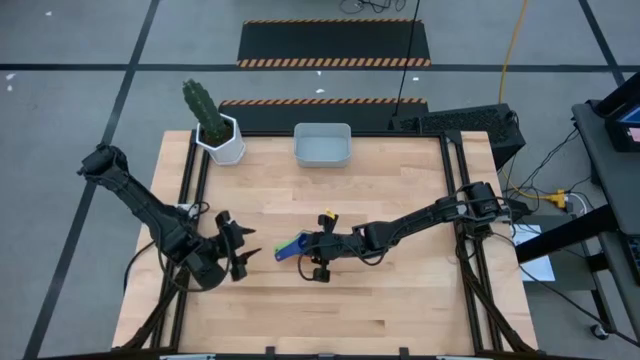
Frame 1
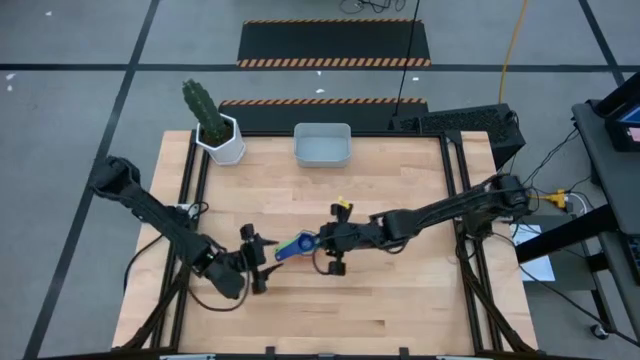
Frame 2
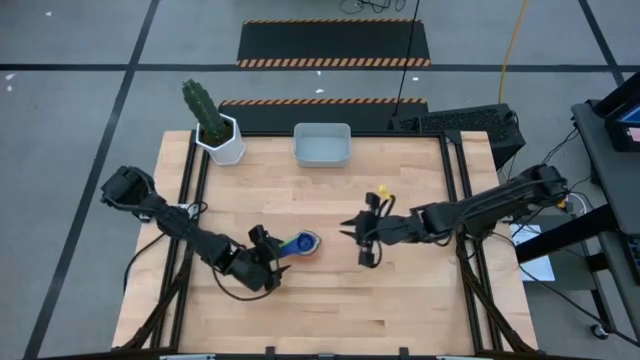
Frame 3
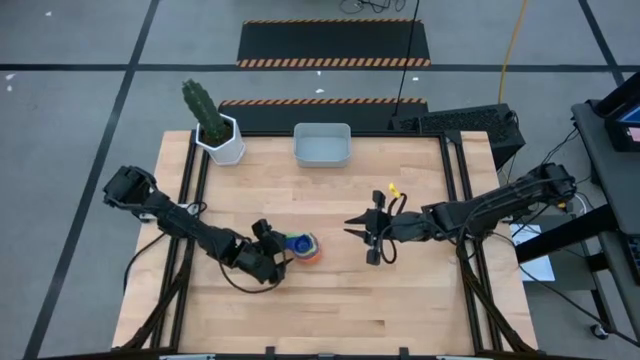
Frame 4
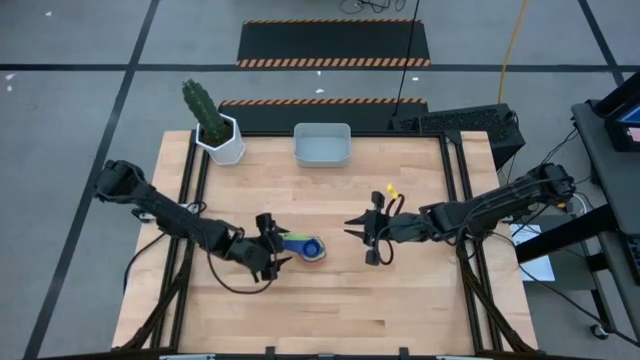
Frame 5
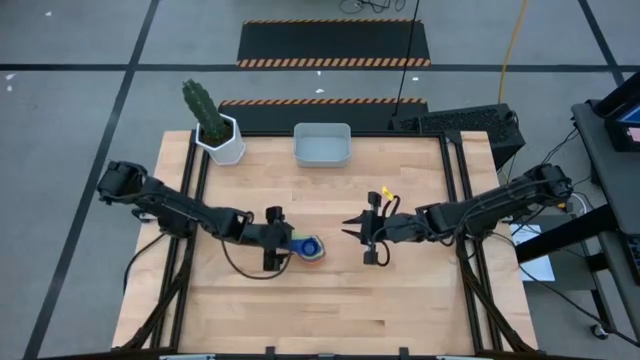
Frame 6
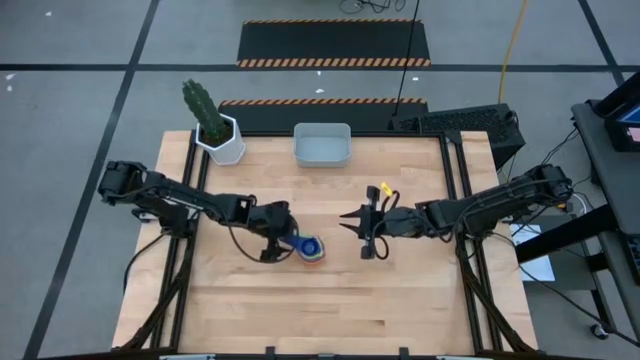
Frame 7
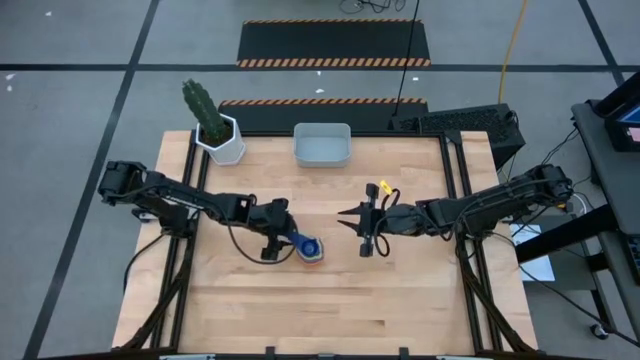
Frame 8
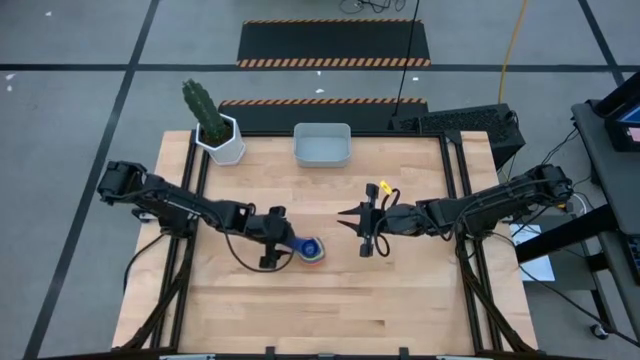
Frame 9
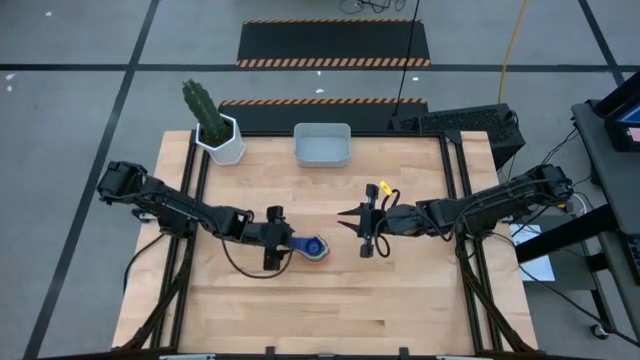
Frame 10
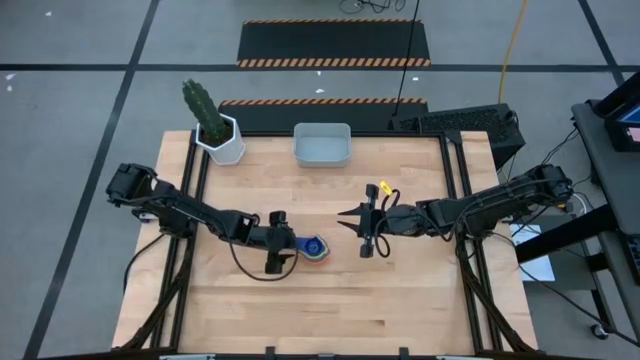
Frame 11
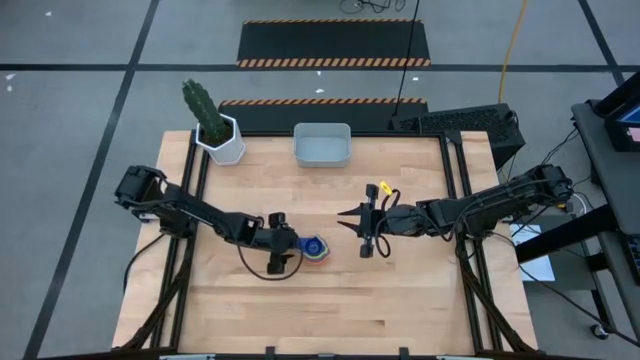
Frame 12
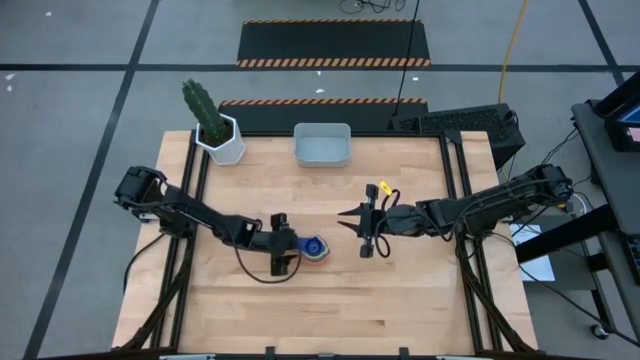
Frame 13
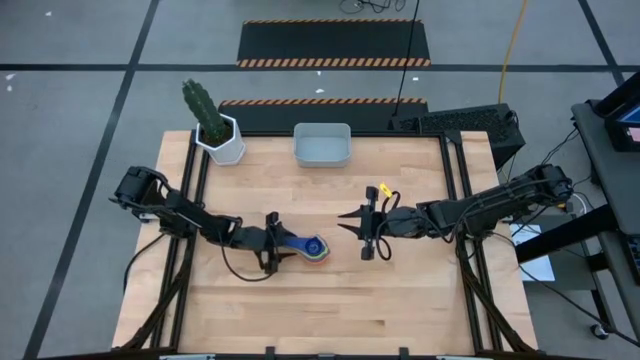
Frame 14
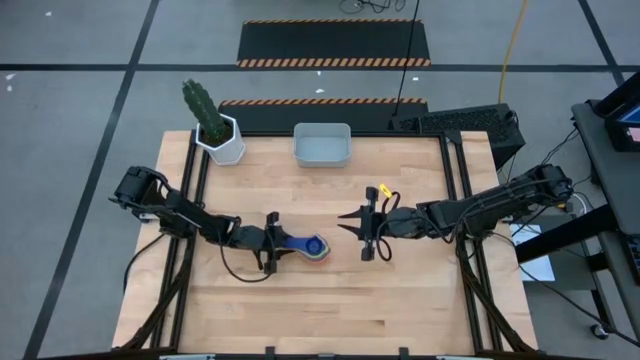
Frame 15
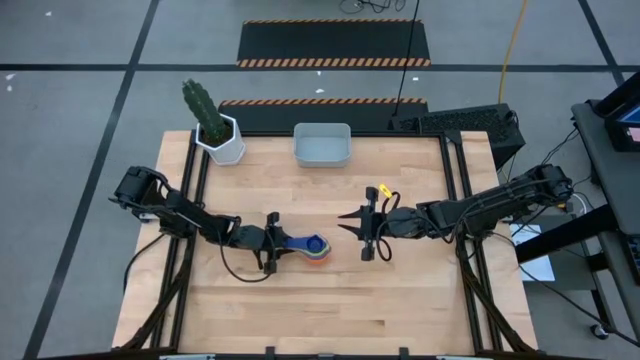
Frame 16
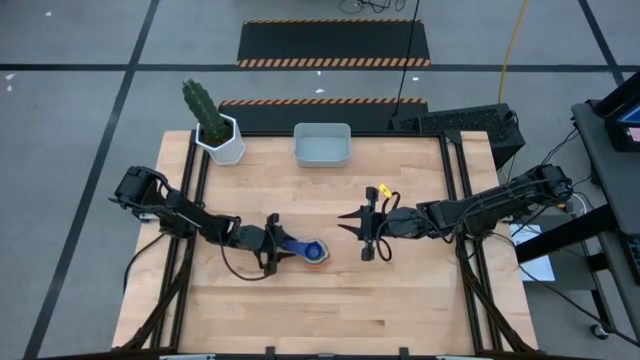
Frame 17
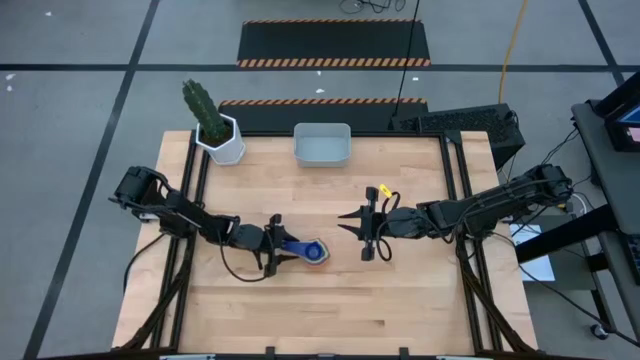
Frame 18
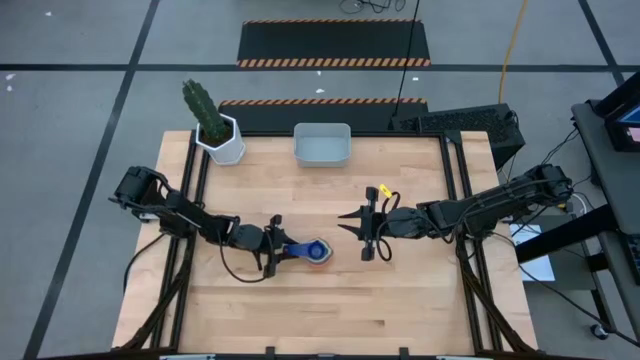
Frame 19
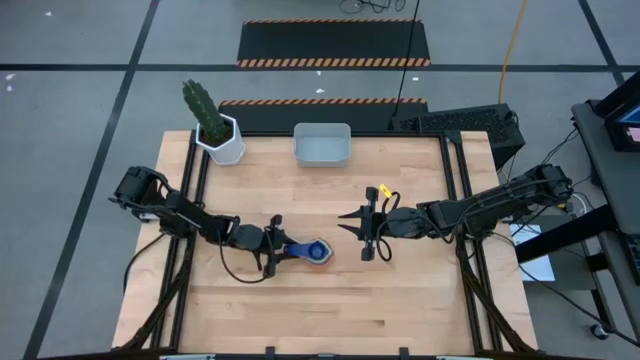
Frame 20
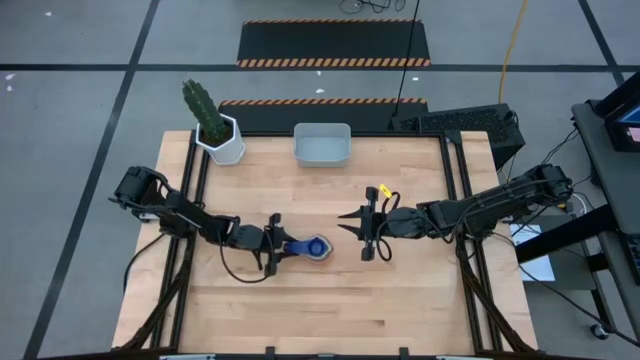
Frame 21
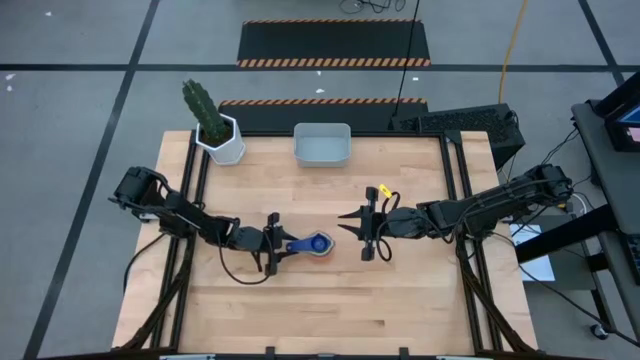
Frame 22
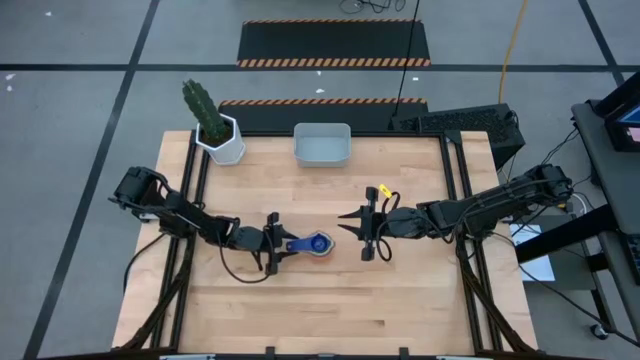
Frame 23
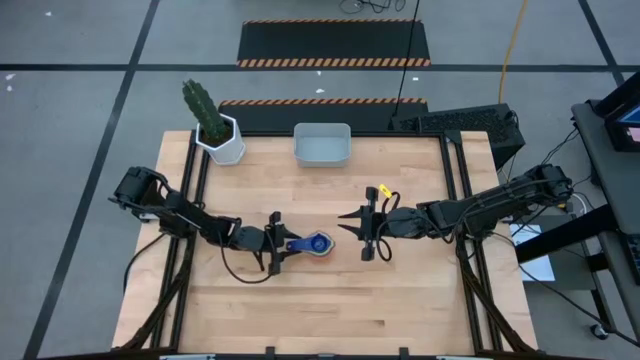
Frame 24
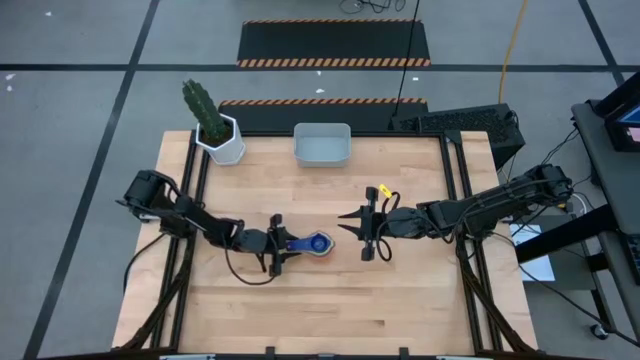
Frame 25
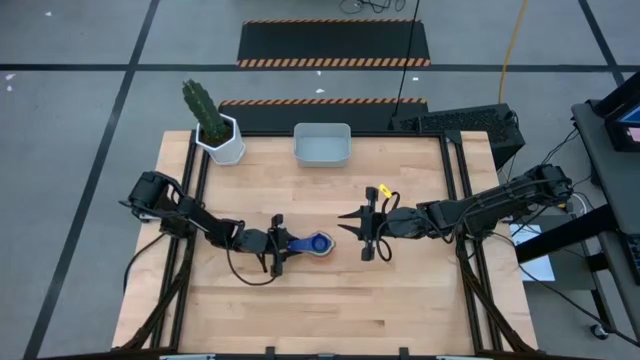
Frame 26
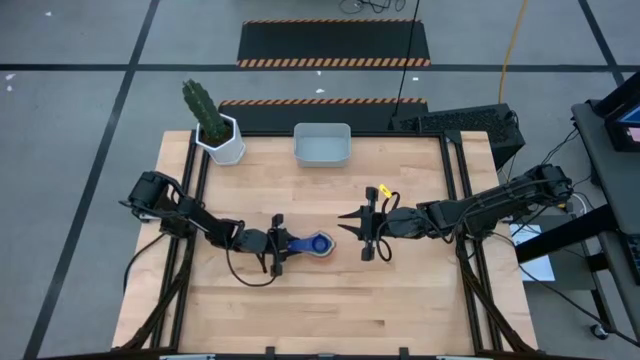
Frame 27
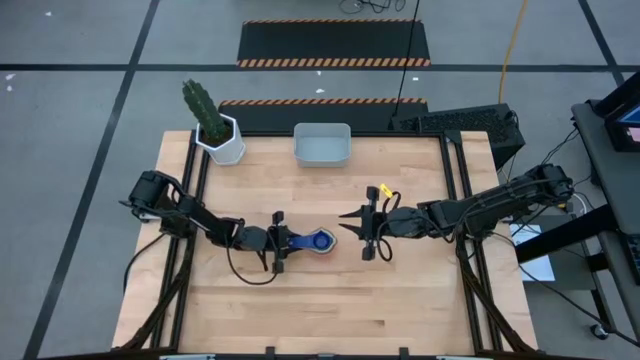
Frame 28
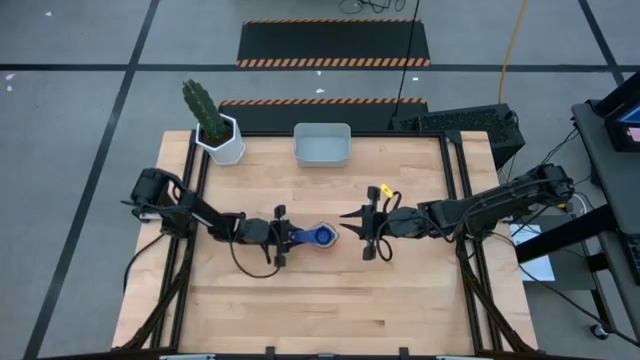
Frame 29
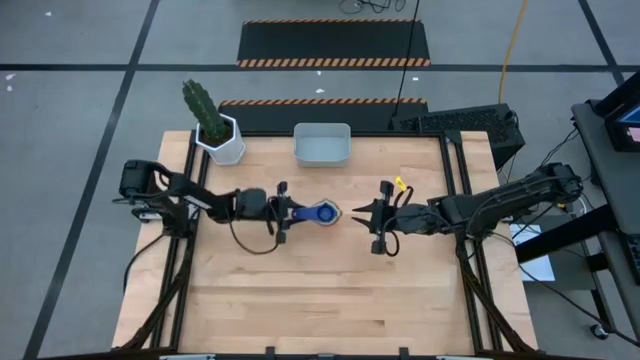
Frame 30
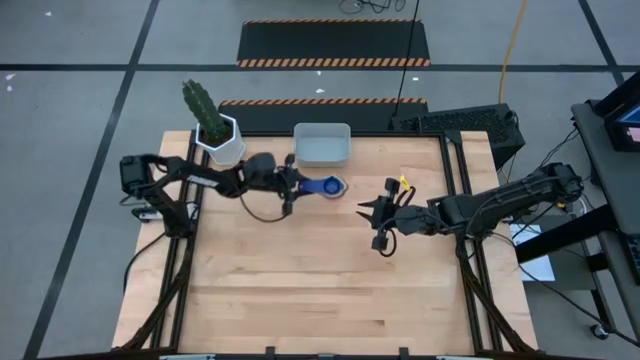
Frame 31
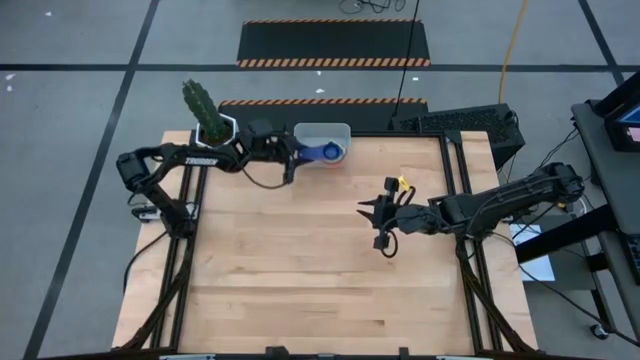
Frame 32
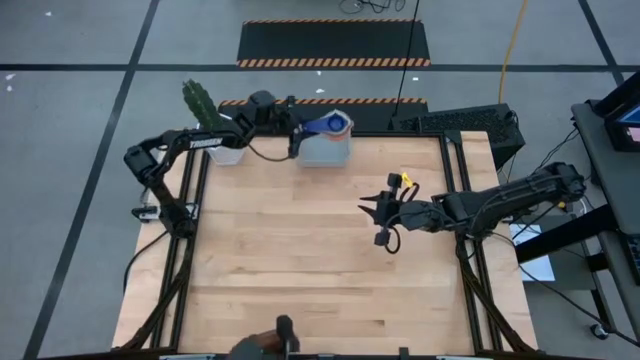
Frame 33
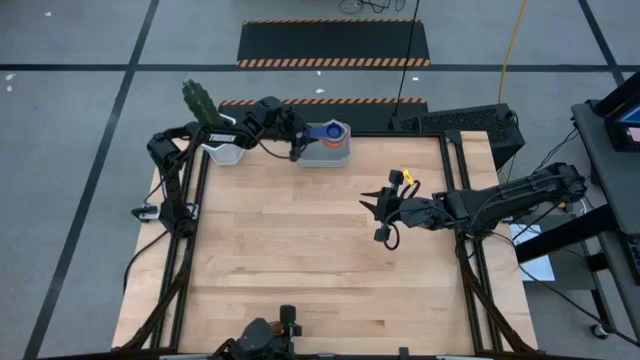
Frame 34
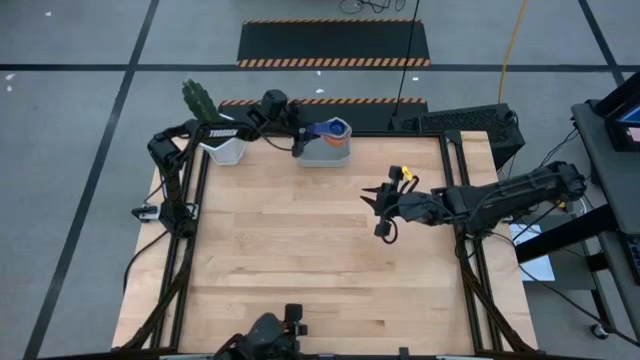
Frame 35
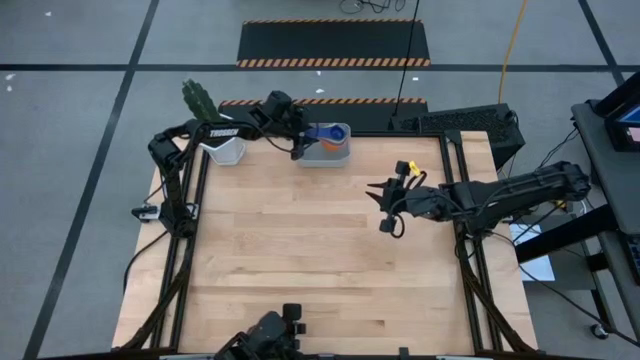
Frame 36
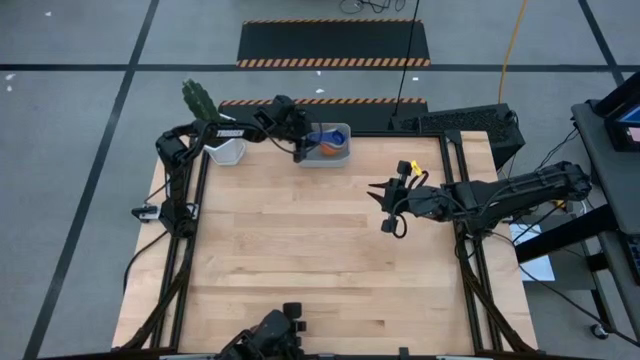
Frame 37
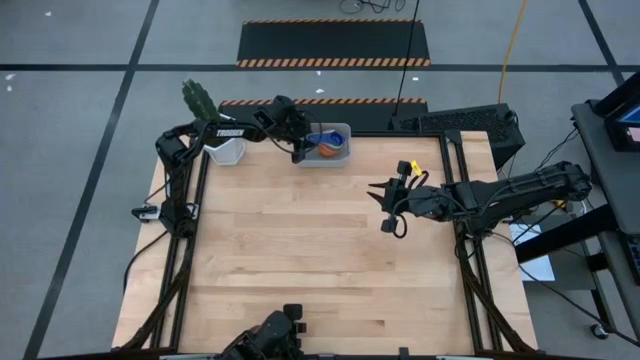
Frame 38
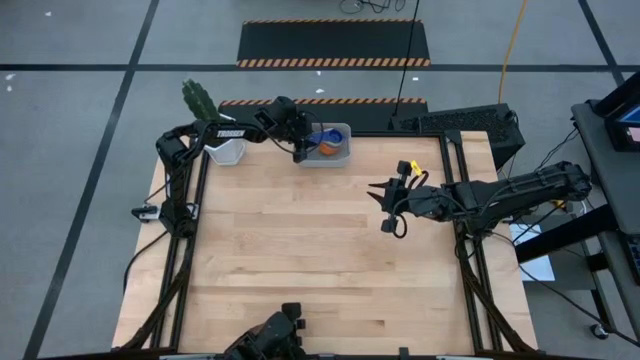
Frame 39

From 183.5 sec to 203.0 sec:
Task: Nest measuring cups in basket
Put the stacked measuring cups into the bin

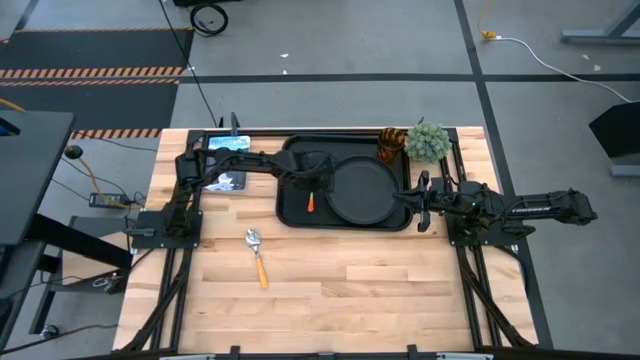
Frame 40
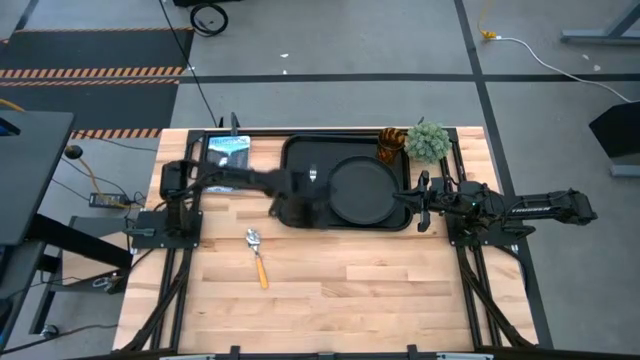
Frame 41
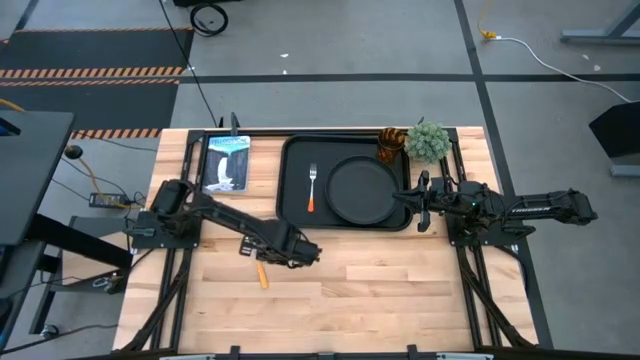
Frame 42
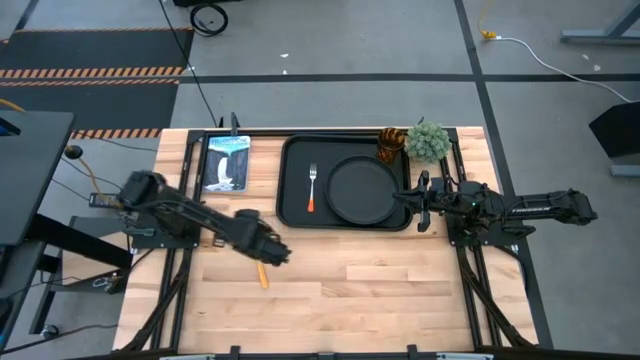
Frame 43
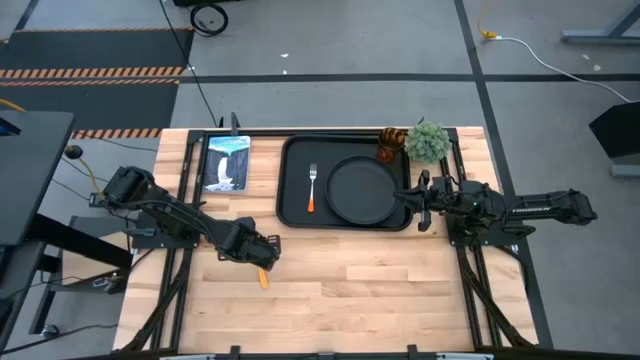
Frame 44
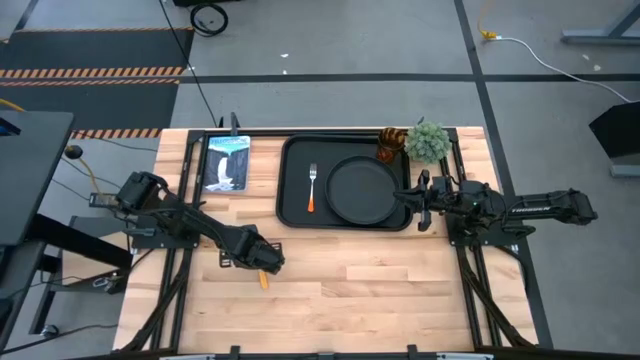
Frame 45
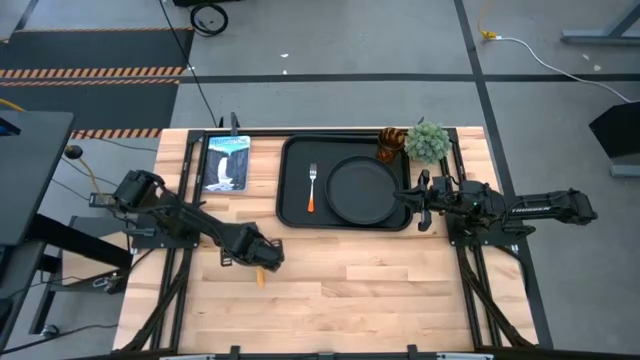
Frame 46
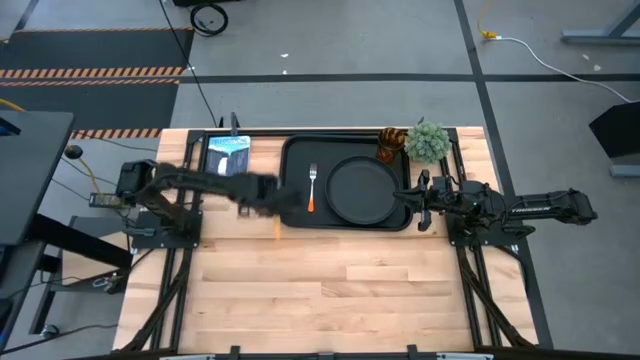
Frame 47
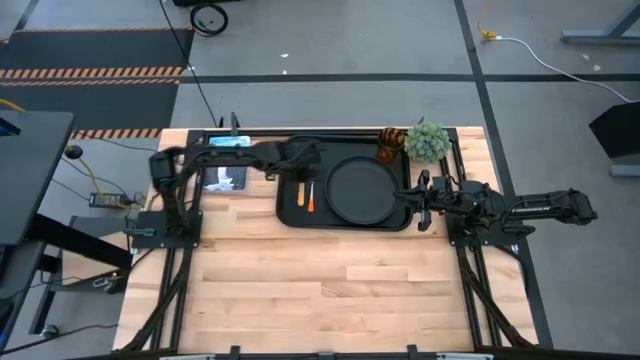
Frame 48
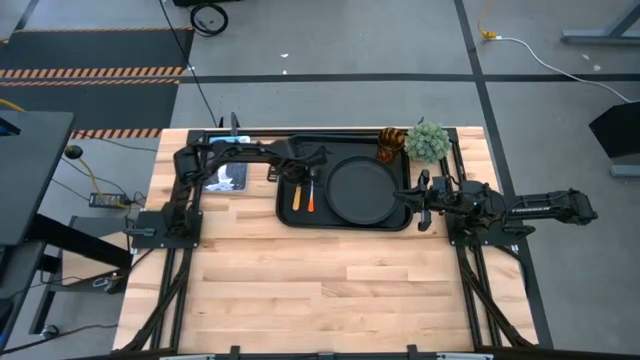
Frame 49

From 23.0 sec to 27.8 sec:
Task: Pick and place plate/cup/fork/spoon on tray
Put the orange spoon on the black serving tray to the left of the orange fork
